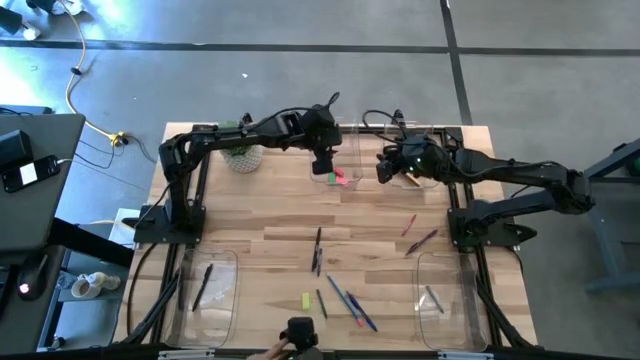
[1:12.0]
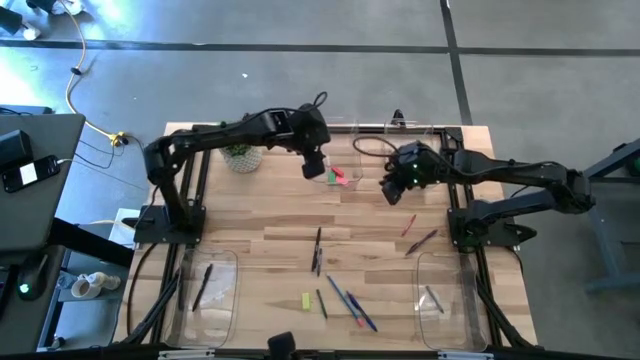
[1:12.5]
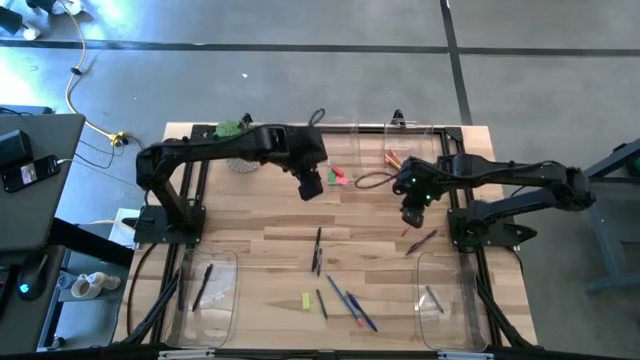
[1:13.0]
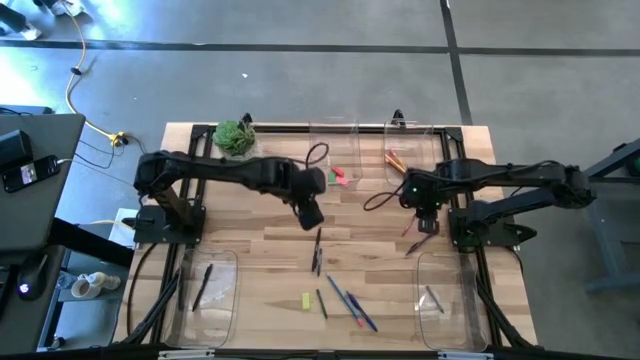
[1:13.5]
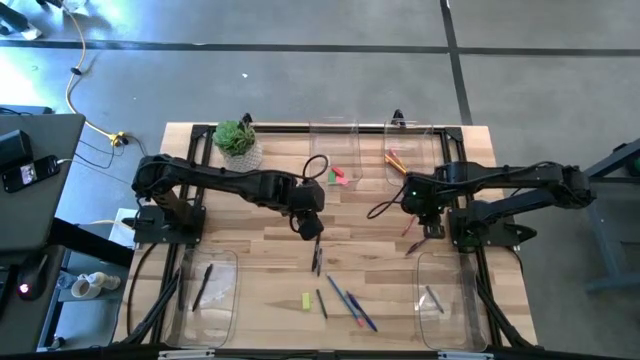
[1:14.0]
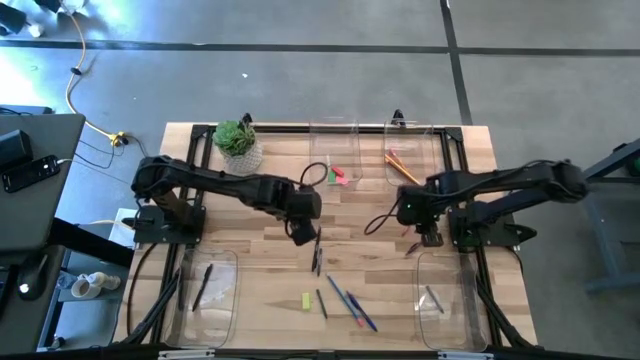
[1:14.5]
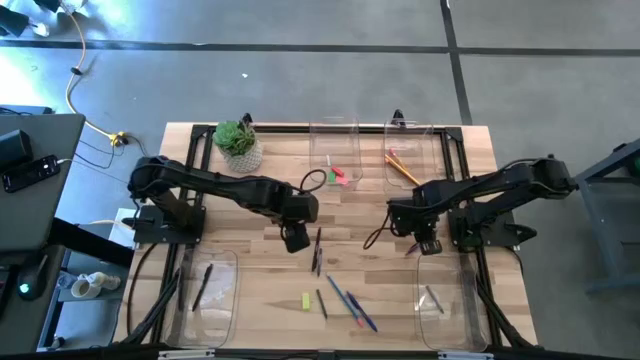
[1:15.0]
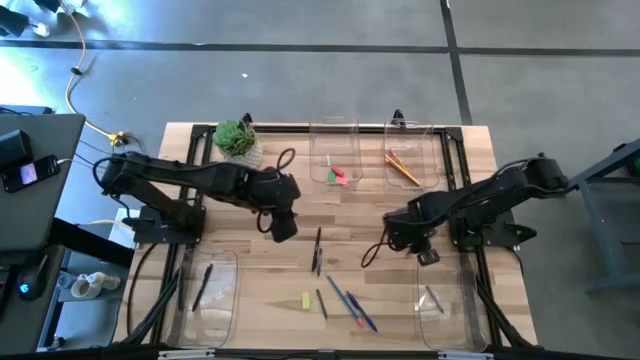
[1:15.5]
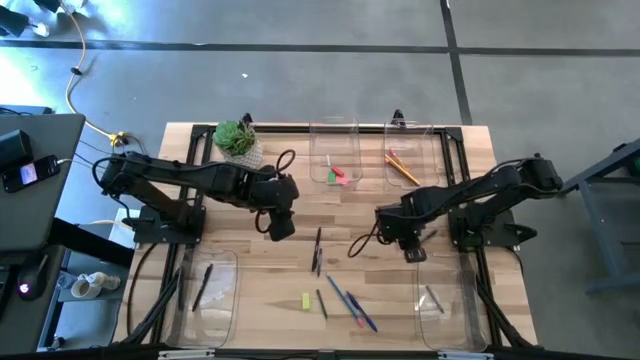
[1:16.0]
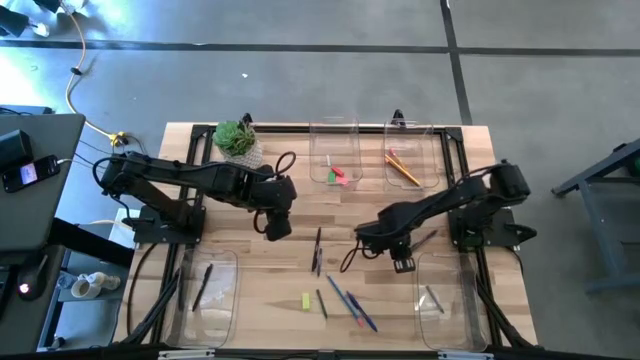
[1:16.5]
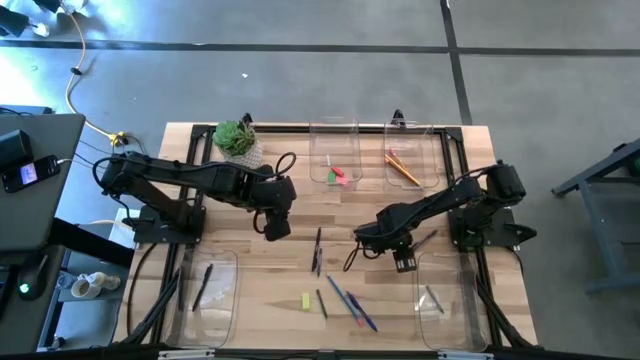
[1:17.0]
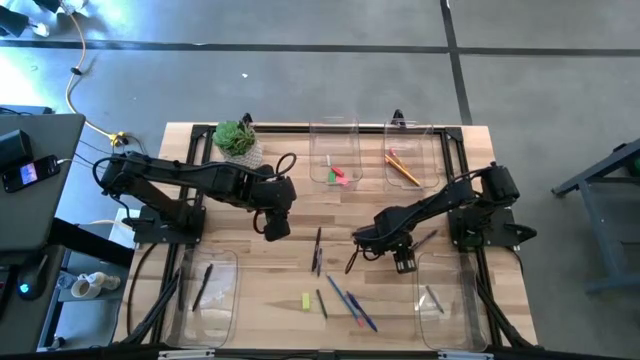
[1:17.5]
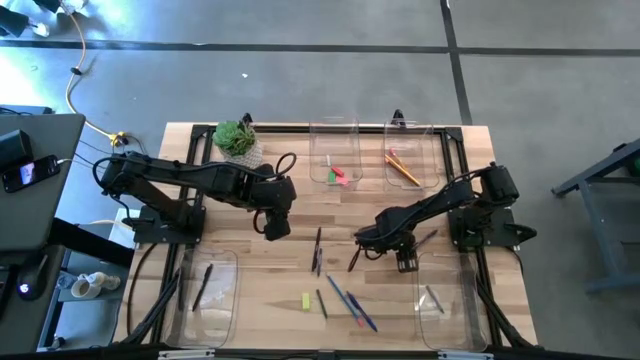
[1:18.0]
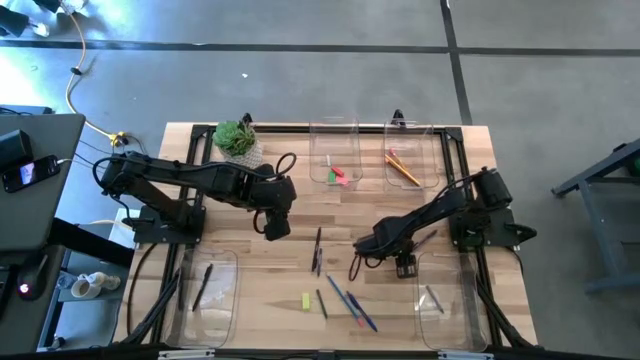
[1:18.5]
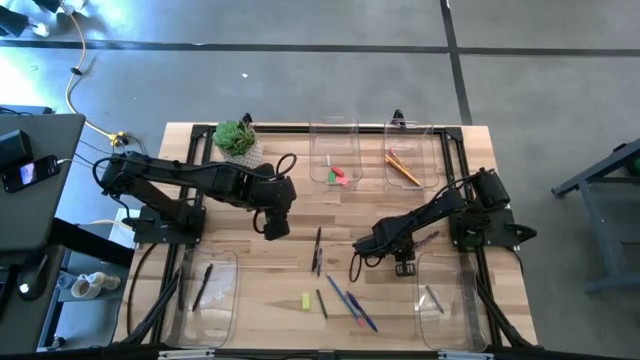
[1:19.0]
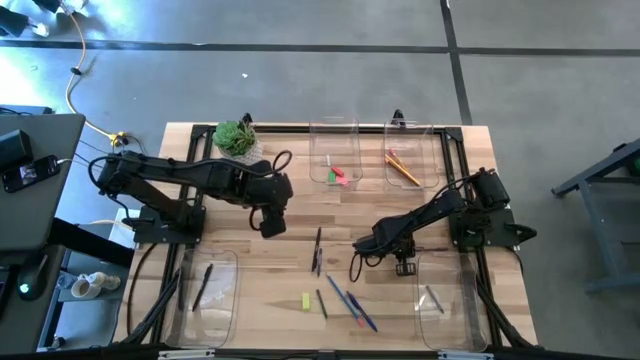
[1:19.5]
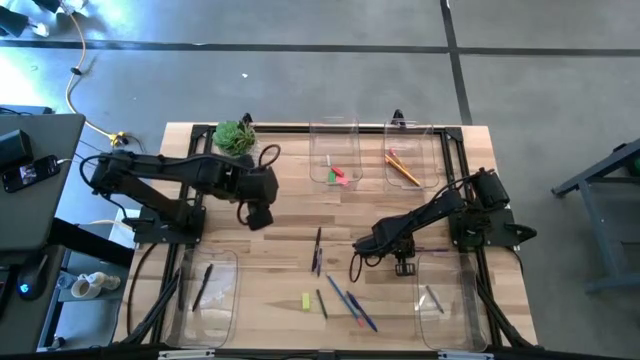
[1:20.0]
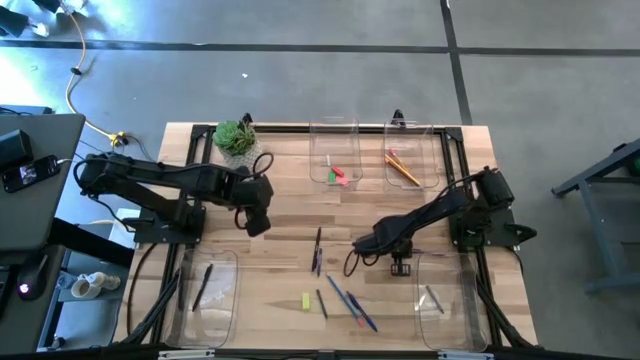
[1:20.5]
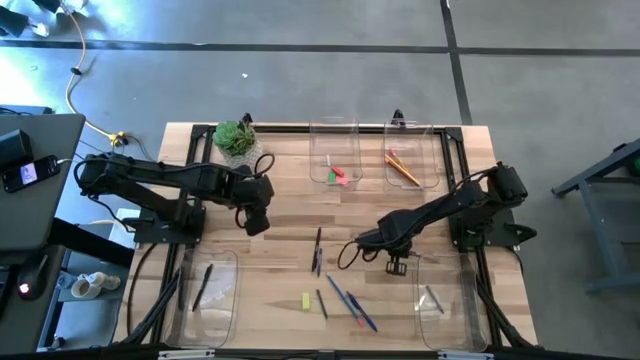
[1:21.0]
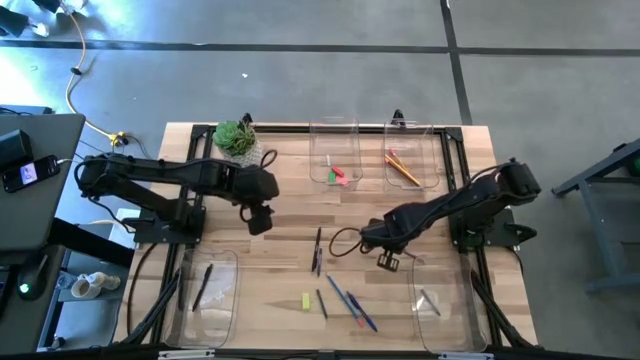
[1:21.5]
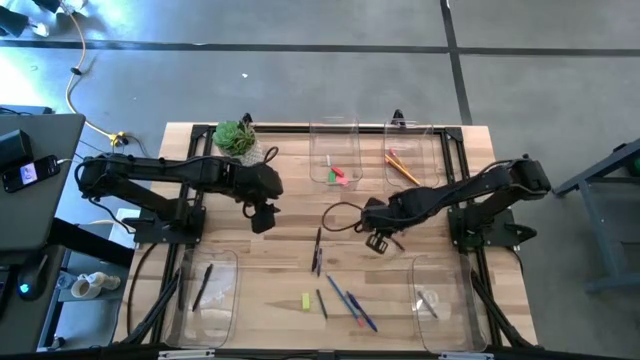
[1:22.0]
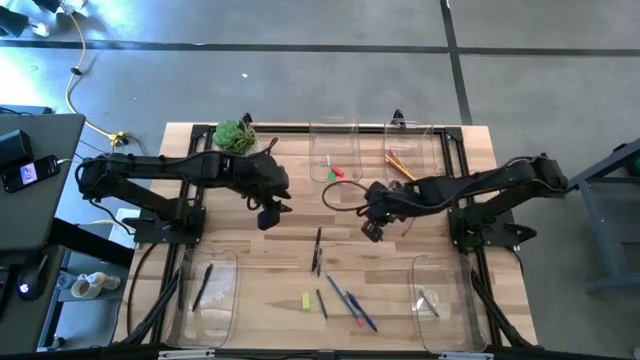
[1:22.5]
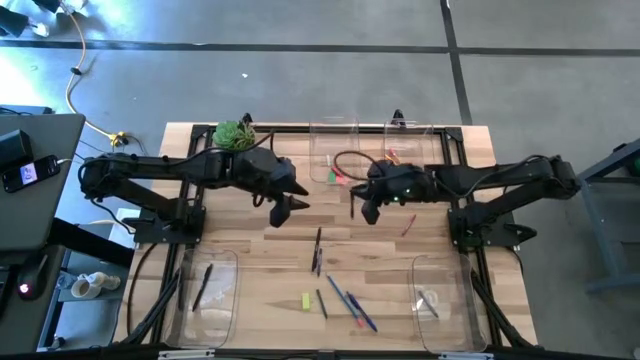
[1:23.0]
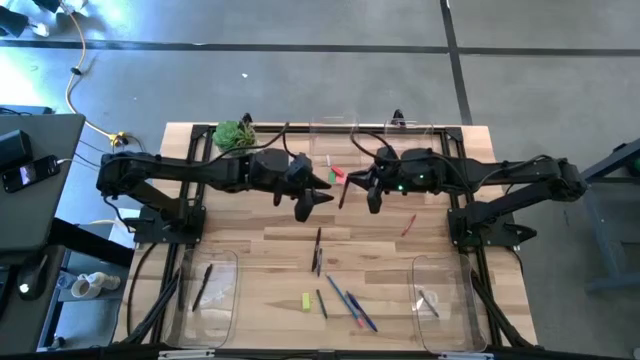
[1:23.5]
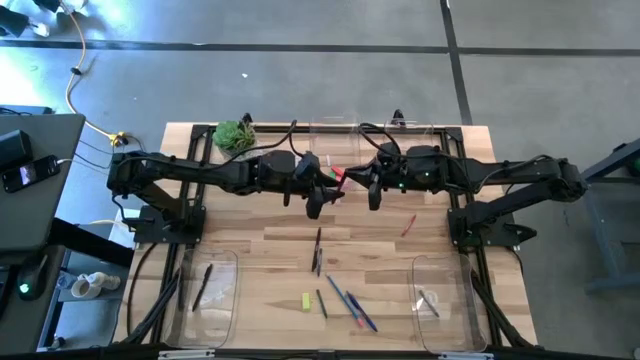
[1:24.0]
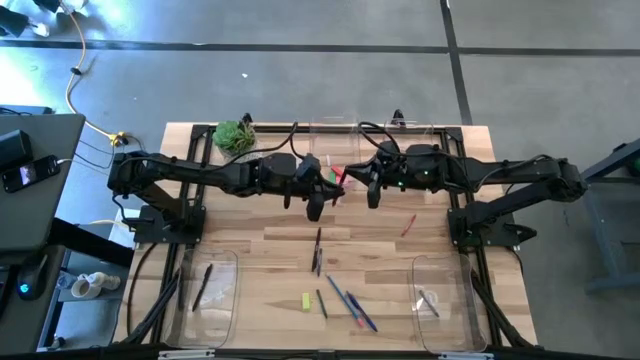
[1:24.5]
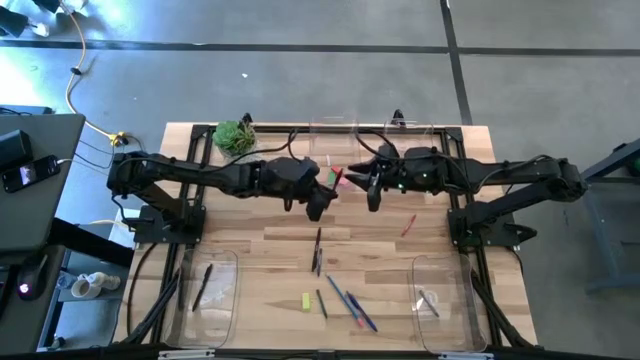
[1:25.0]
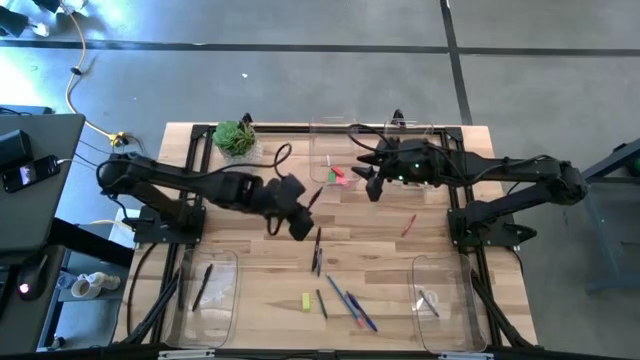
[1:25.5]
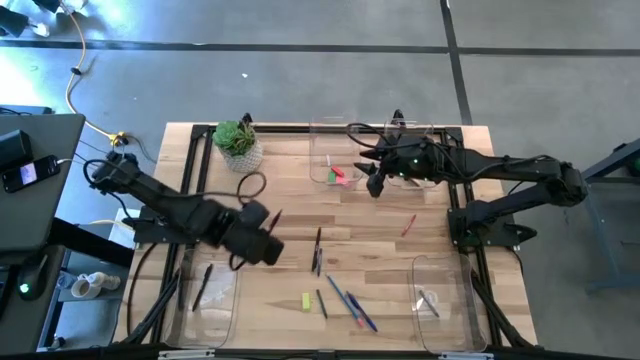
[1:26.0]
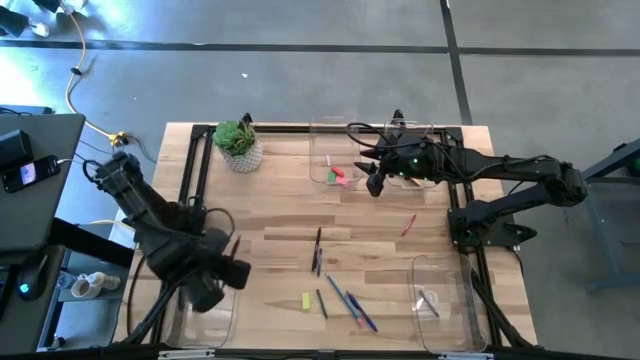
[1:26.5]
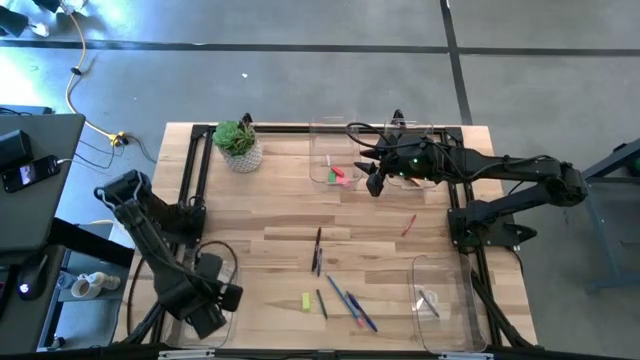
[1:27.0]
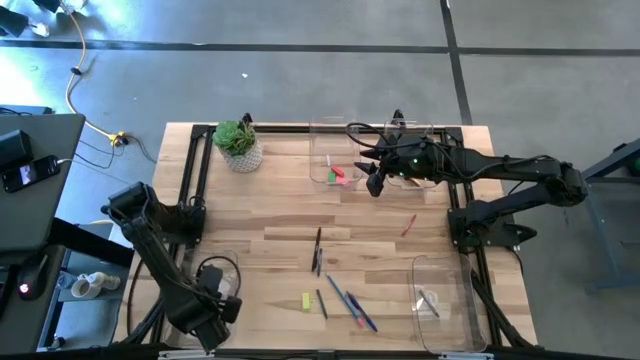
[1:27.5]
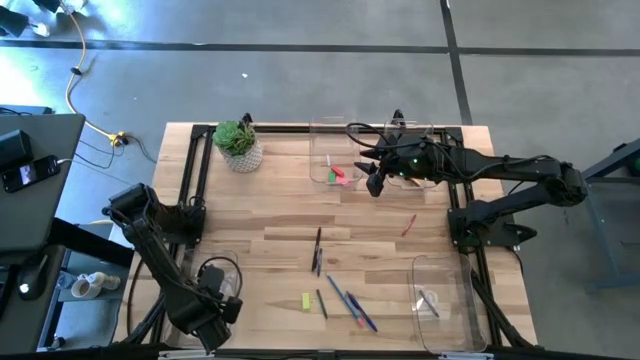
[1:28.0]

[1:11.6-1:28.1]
Task: Sort crayons/erasers/pens/pencils in bins
Put the violet pen into the bottom left transparent bin

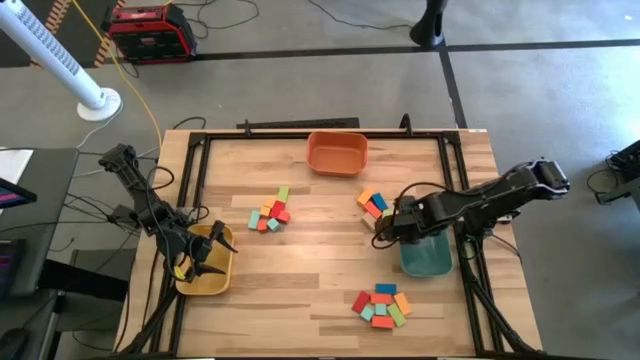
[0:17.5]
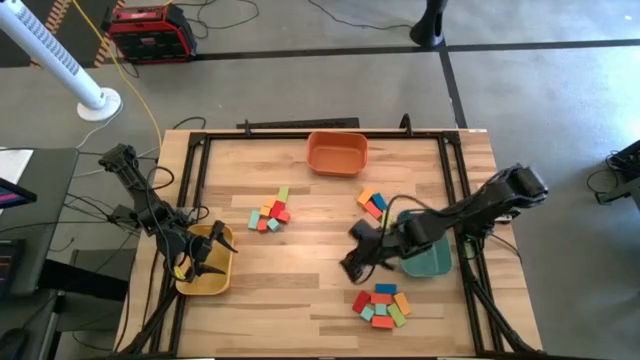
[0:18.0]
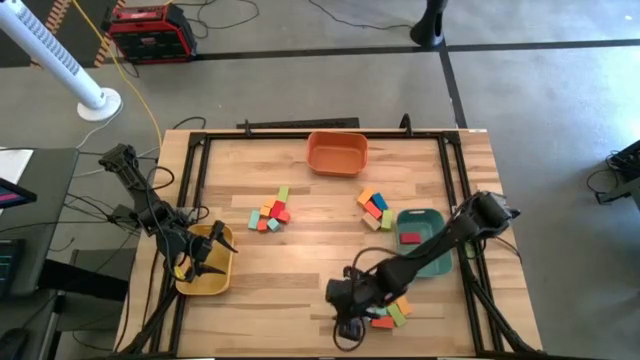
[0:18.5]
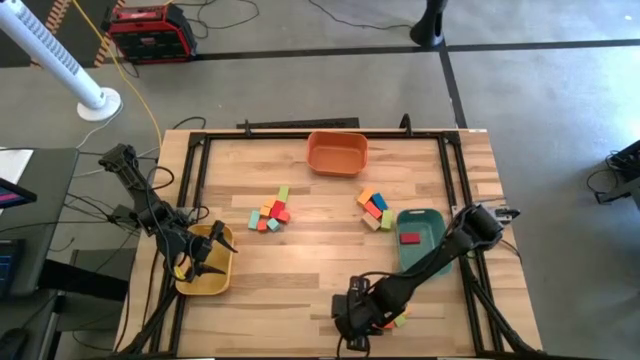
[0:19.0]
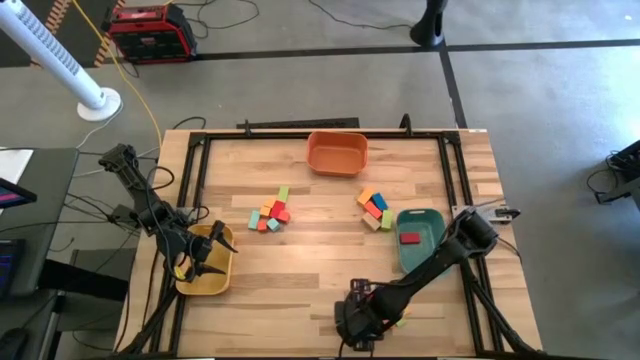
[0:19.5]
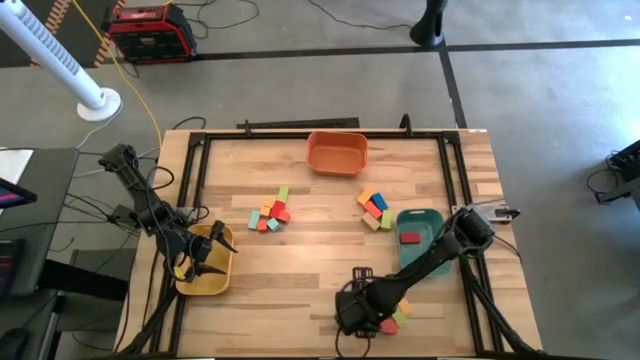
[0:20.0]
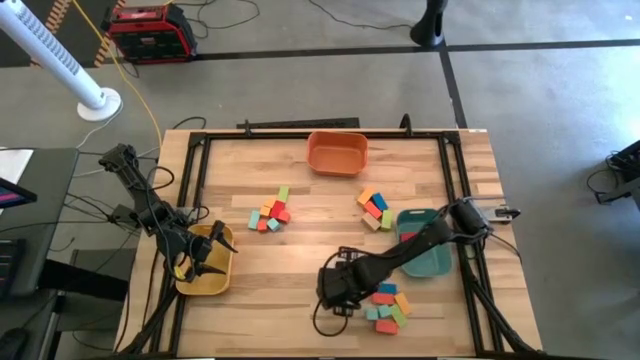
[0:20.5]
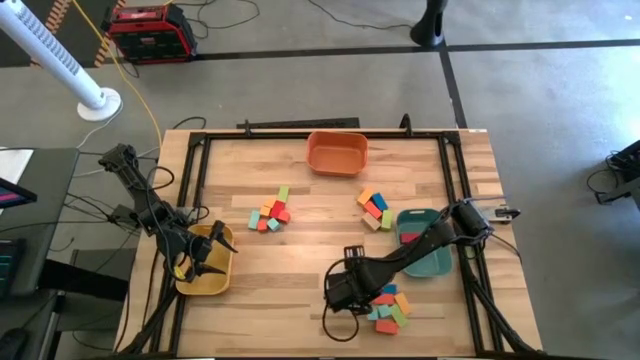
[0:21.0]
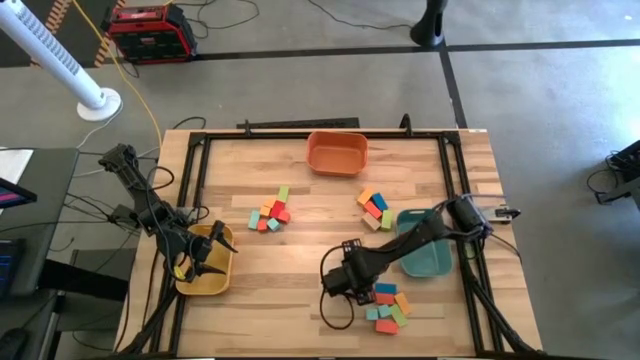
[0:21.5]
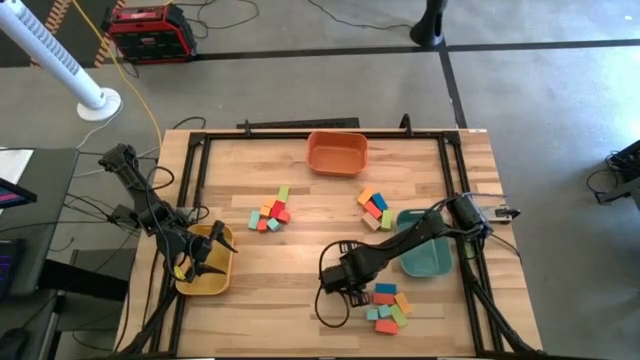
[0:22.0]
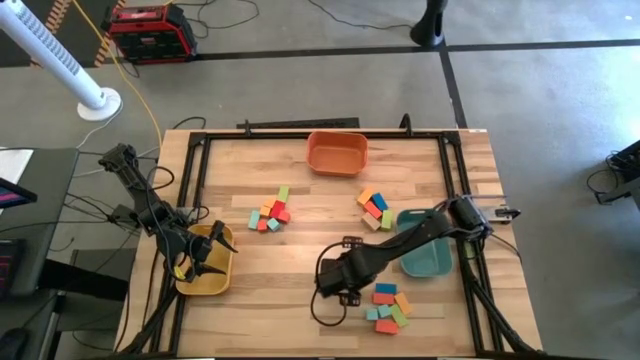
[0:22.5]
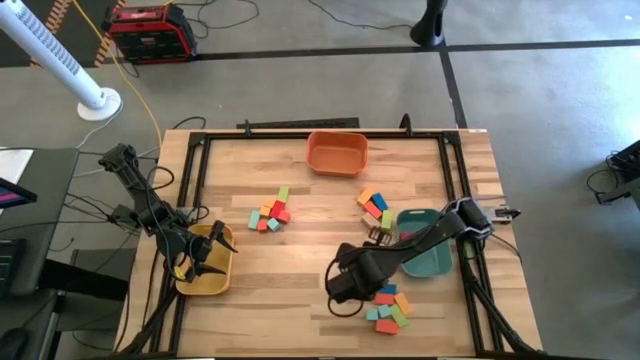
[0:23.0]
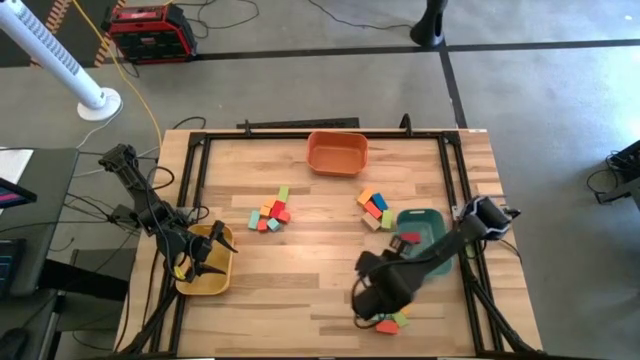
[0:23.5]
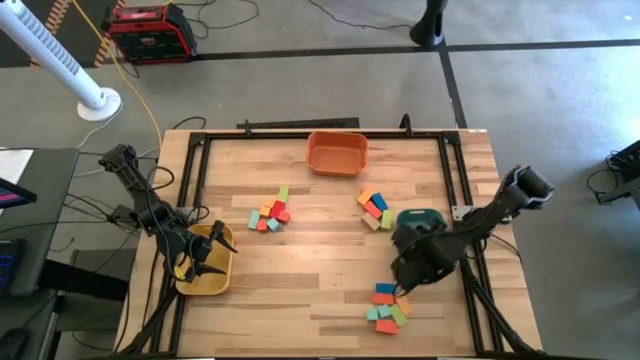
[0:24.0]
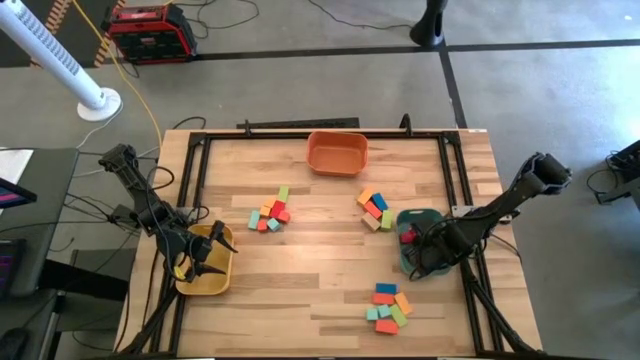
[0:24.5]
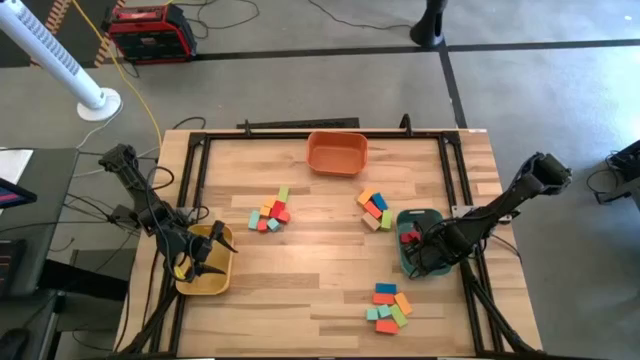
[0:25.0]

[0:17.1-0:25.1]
Task: Sort blocks by size
Put the medium red block into the green bin
